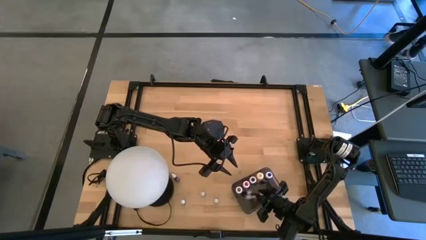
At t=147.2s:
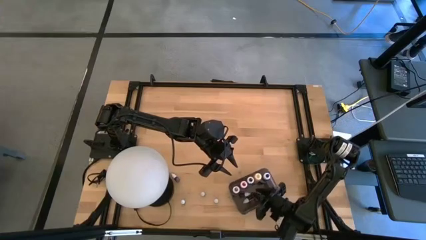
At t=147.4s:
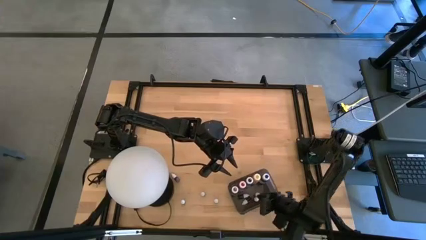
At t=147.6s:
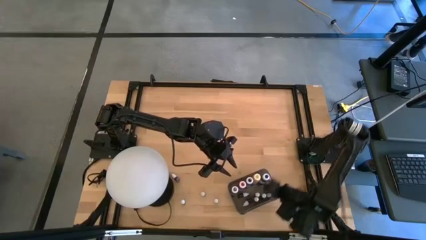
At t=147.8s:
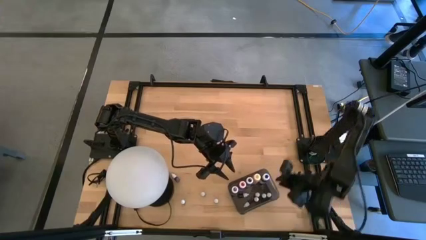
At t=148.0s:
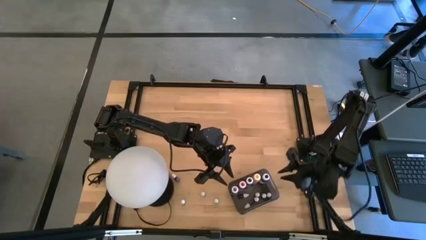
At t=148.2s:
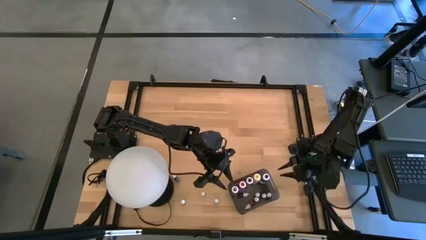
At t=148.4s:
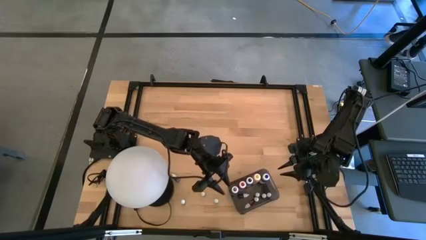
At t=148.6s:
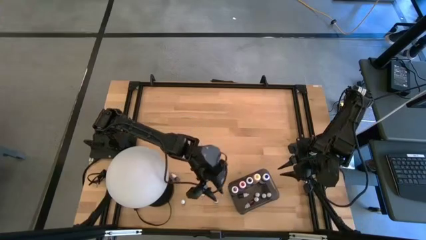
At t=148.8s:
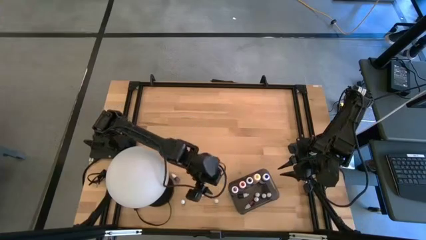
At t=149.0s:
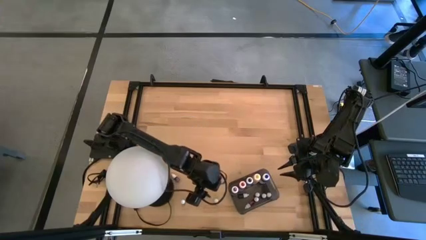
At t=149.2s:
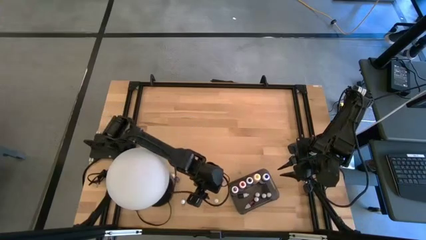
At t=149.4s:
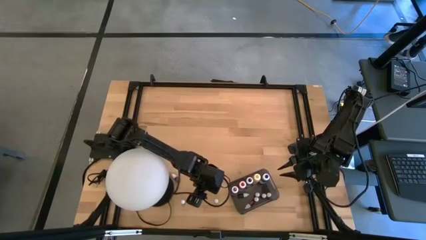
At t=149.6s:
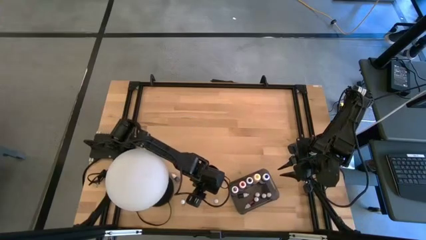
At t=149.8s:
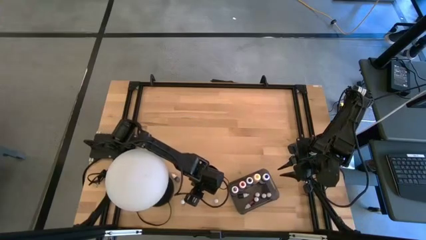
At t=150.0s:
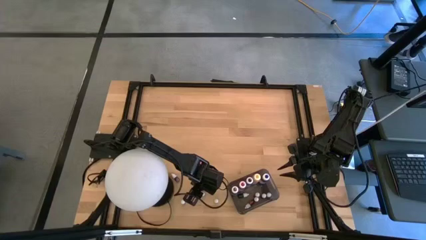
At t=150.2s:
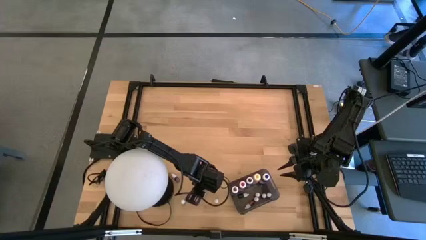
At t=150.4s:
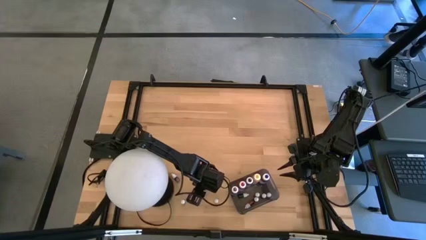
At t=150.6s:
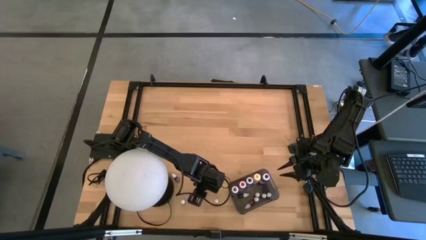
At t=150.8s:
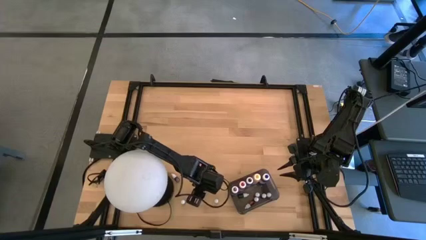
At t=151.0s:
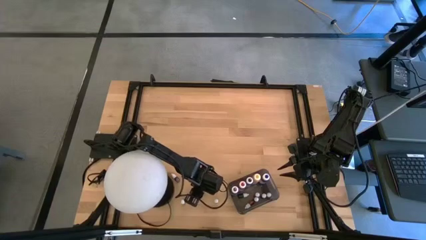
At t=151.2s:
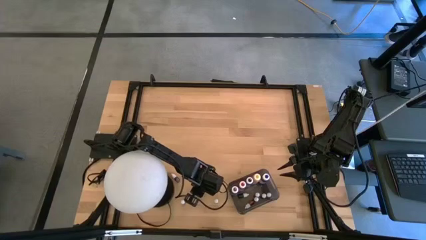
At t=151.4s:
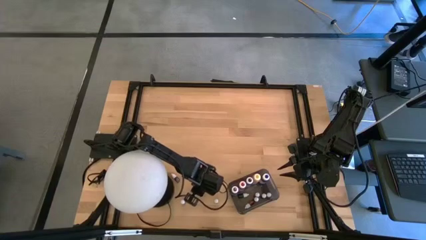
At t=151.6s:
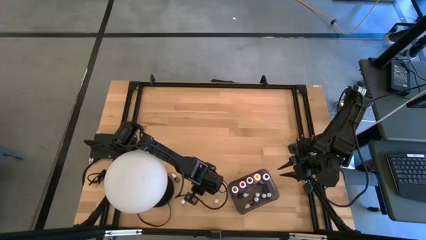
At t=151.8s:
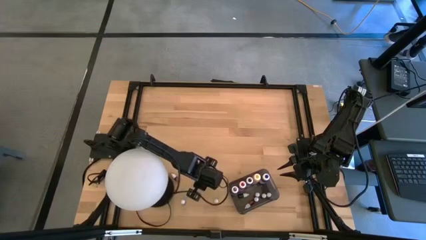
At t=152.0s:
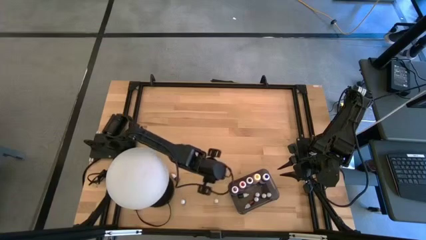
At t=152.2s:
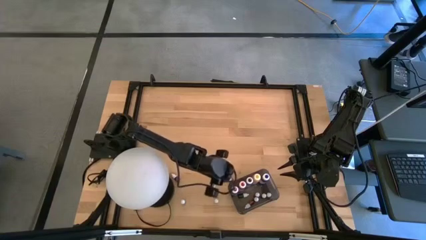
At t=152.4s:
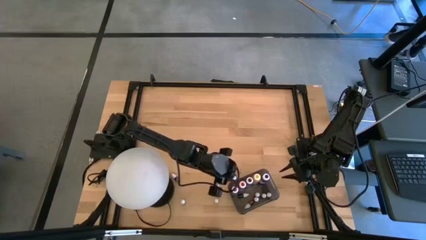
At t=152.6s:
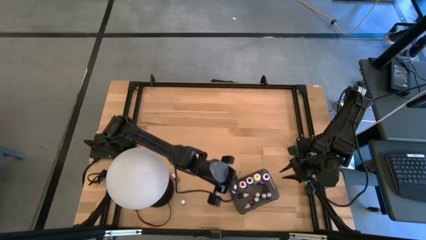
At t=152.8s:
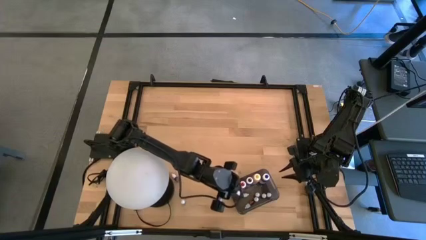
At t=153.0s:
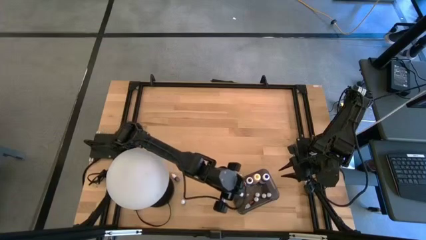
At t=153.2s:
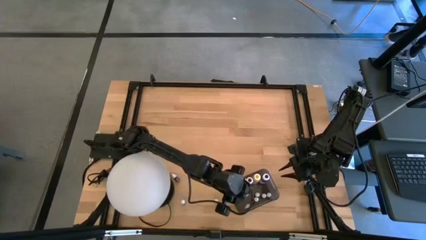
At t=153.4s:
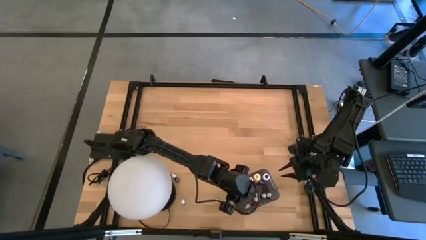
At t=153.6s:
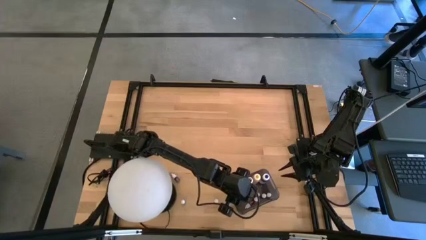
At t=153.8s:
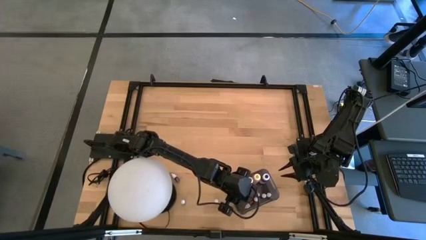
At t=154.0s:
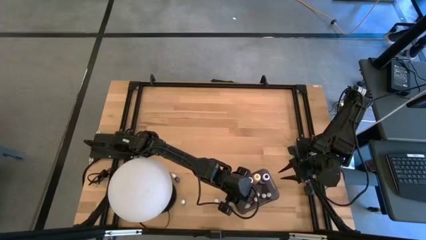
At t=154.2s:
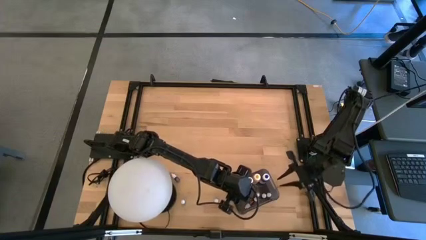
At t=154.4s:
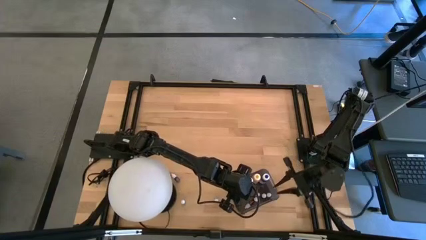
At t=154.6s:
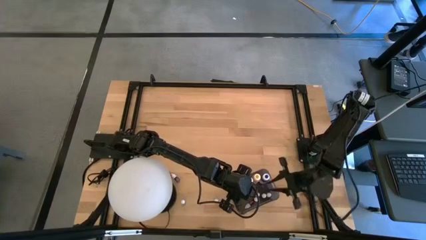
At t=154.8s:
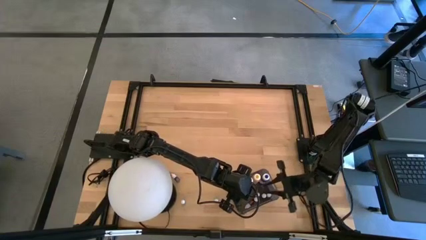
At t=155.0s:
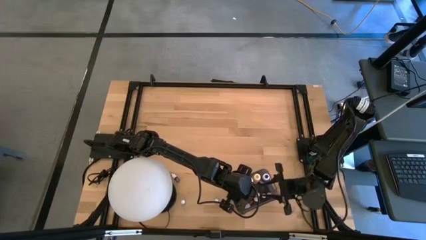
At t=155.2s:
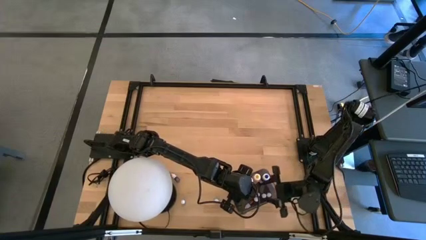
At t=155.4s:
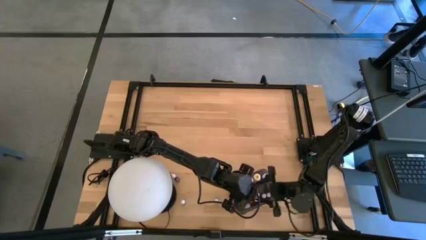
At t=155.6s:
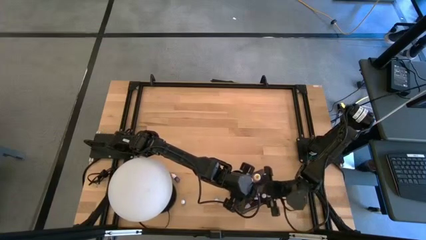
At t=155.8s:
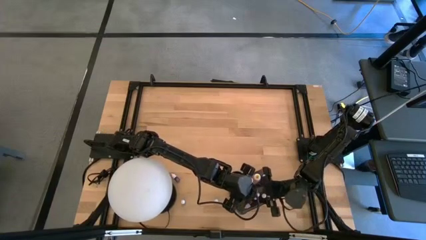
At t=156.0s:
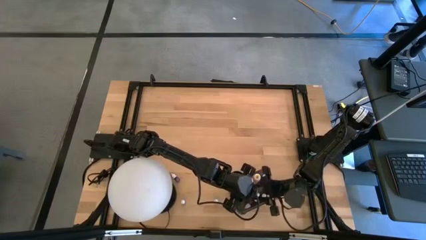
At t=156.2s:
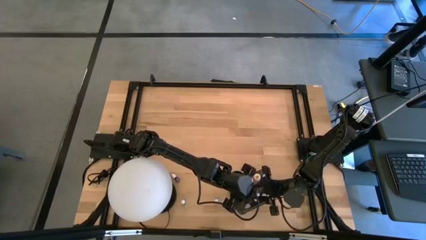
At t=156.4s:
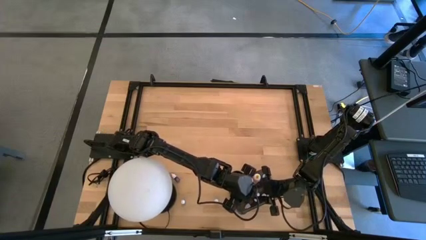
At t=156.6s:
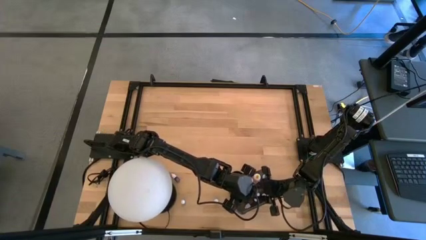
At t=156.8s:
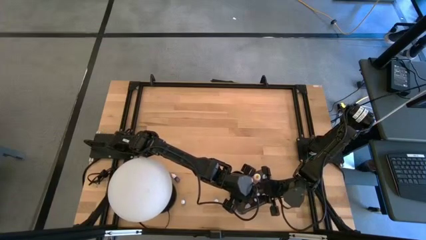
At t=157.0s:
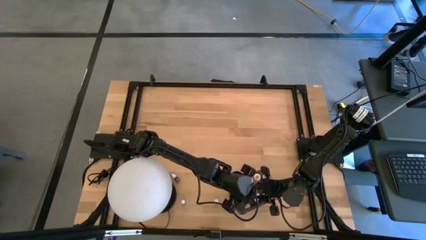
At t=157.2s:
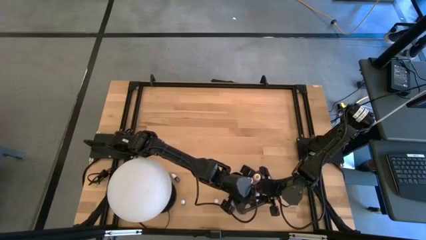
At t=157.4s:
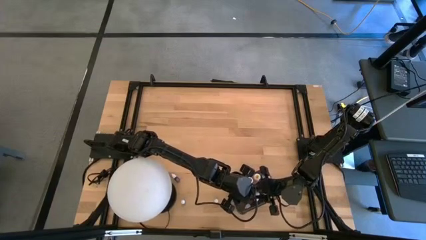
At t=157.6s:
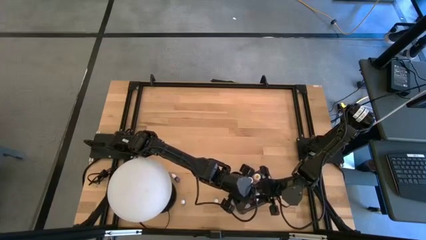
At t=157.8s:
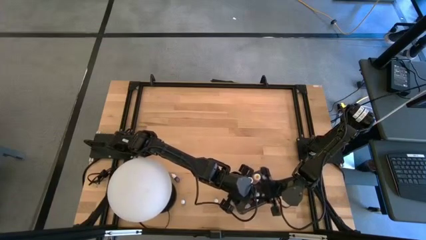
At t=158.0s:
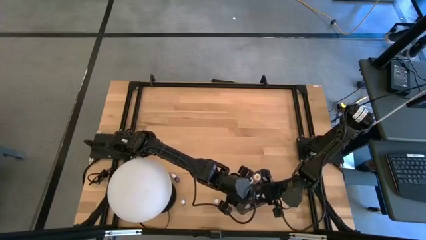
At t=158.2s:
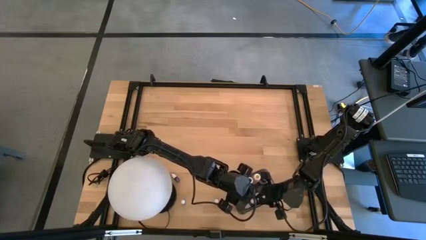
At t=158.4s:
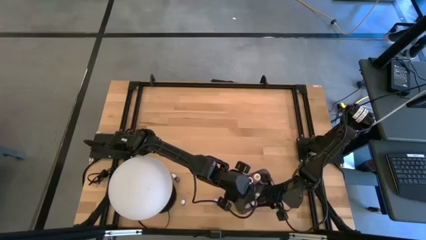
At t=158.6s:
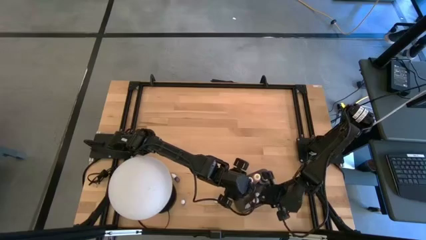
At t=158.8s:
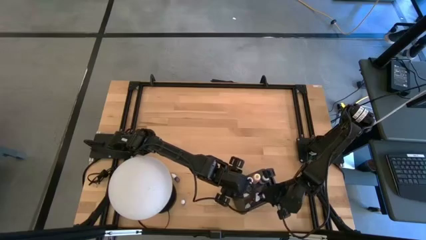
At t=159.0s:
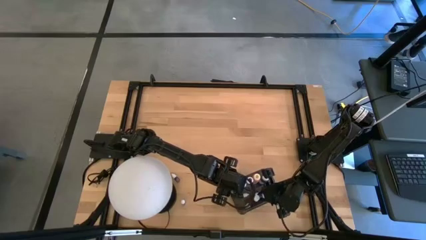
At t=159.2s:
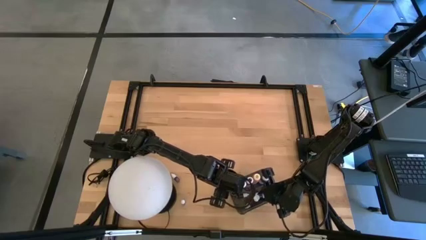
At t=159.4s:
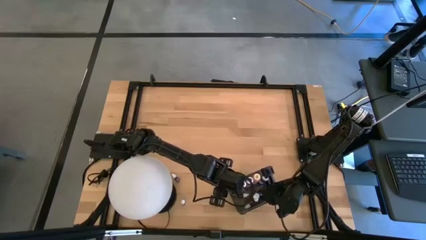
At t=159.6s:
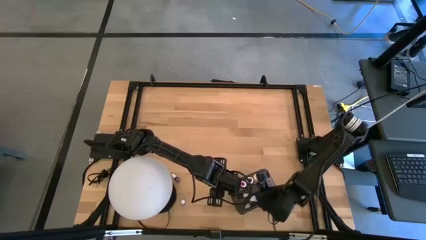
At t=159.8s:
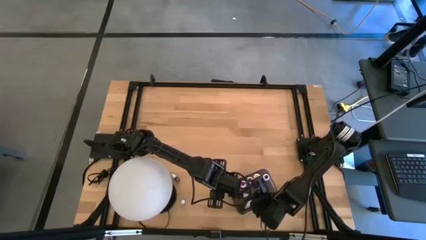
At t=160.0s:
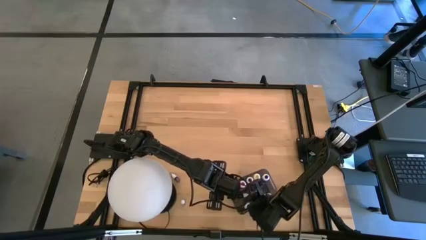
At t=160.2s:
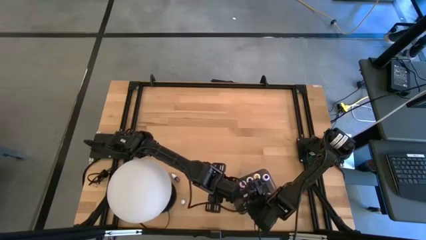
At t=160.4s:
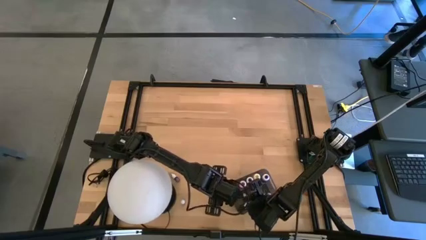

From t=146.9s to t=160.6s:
Task: Pick & Place food coloring
Put the left small blue food coloring bottle into the bin
